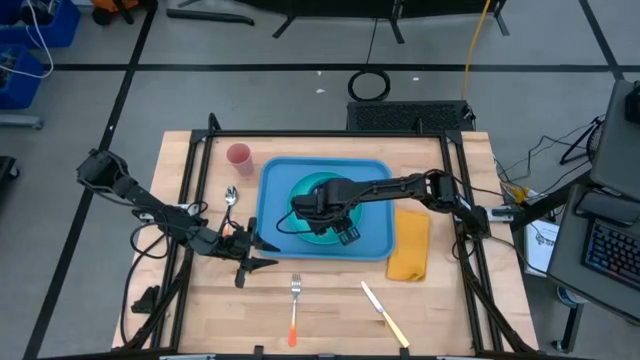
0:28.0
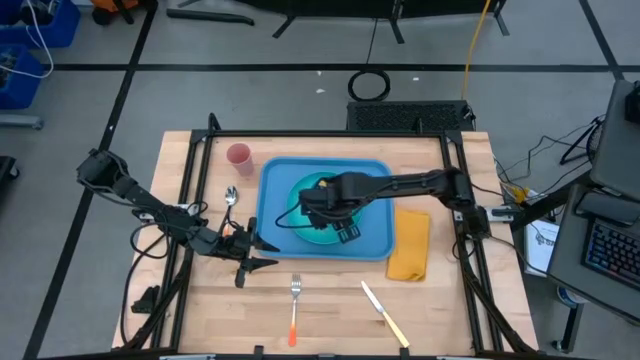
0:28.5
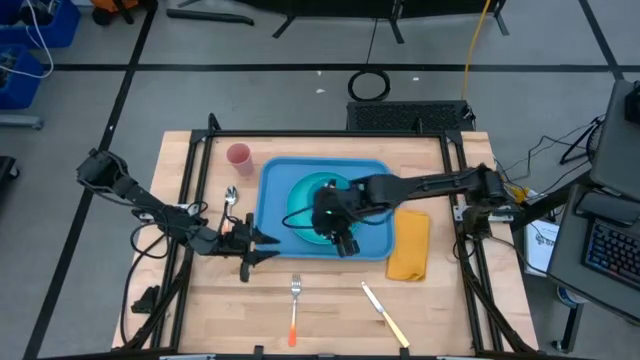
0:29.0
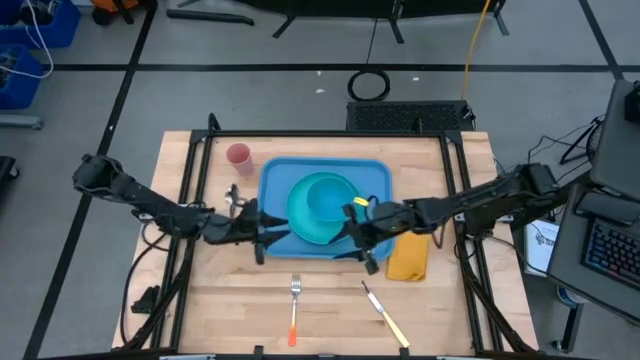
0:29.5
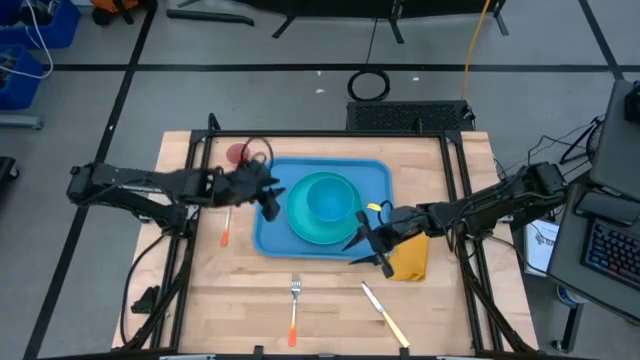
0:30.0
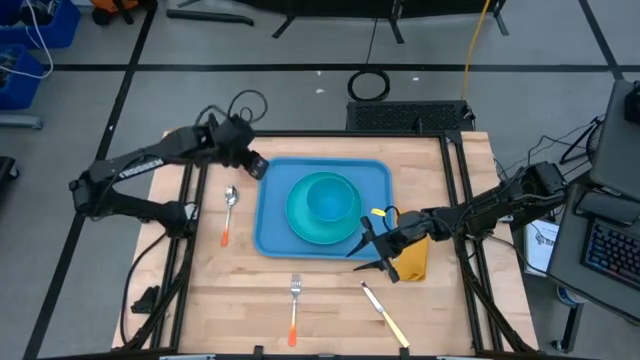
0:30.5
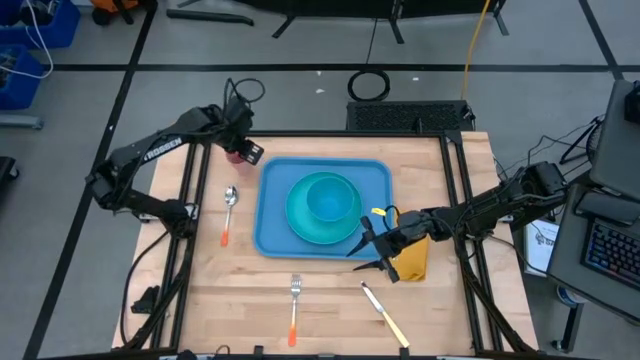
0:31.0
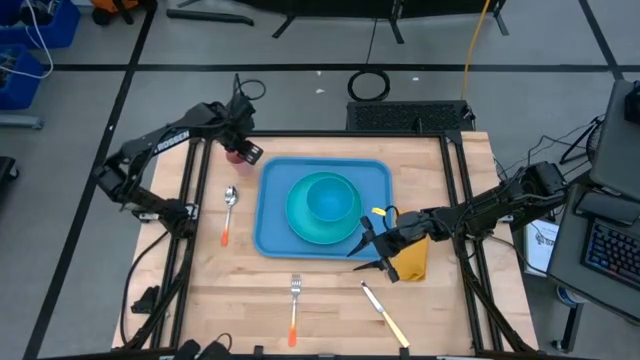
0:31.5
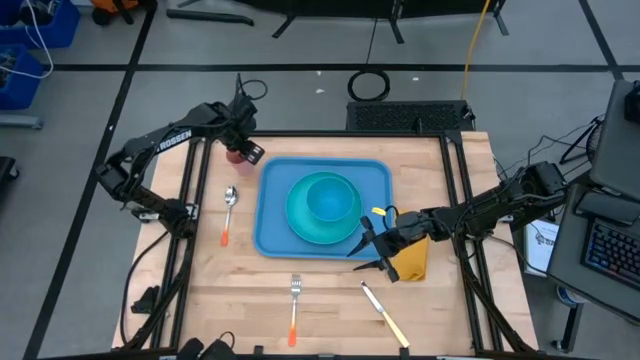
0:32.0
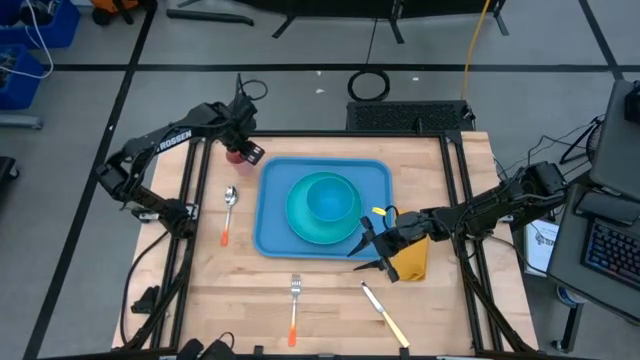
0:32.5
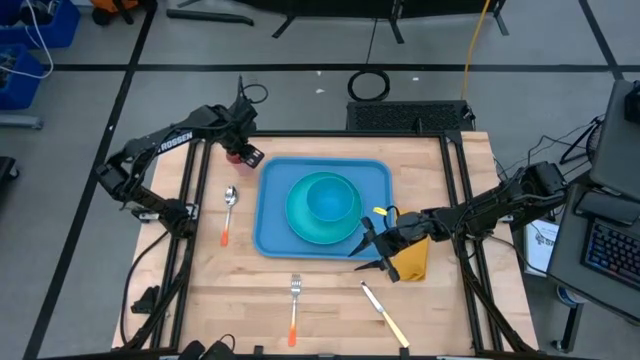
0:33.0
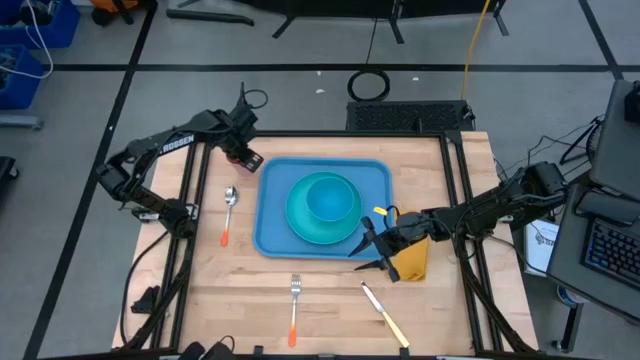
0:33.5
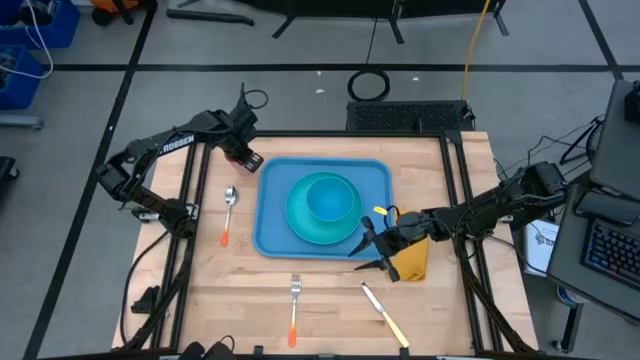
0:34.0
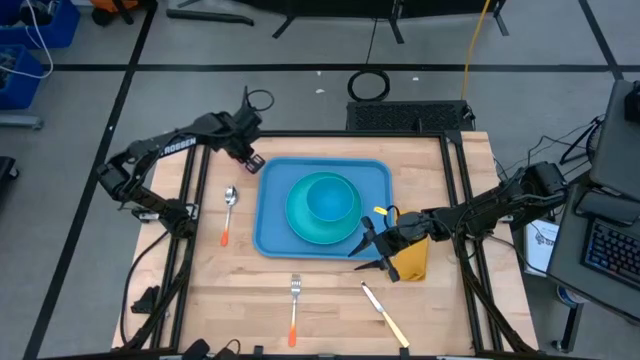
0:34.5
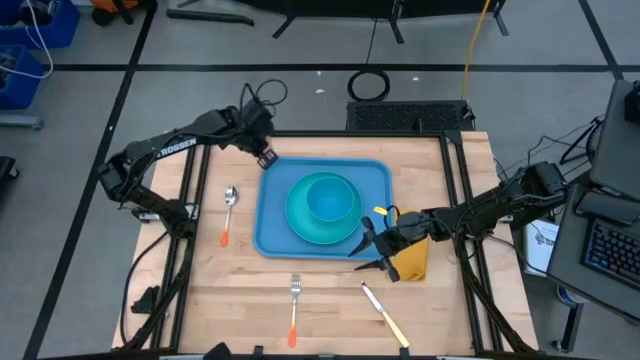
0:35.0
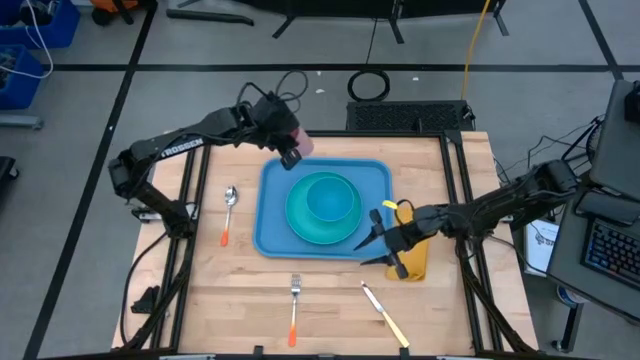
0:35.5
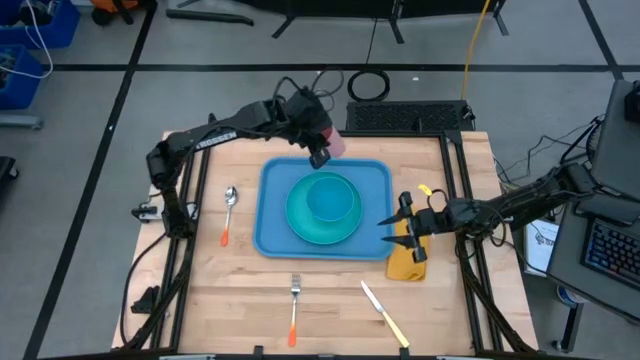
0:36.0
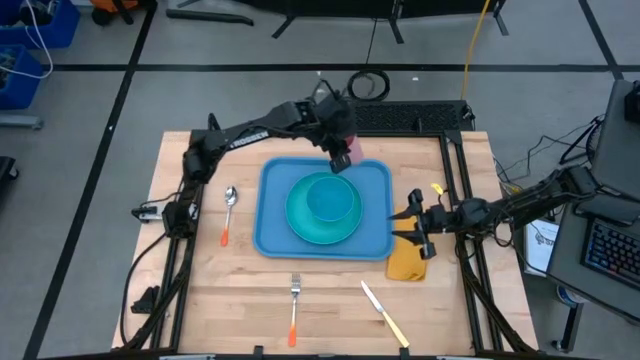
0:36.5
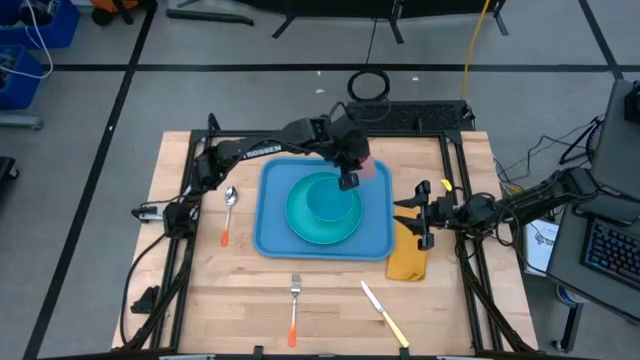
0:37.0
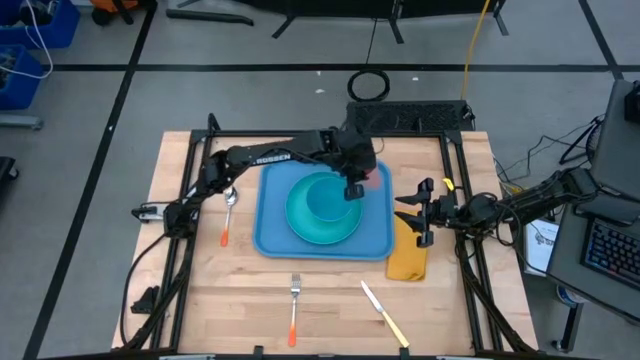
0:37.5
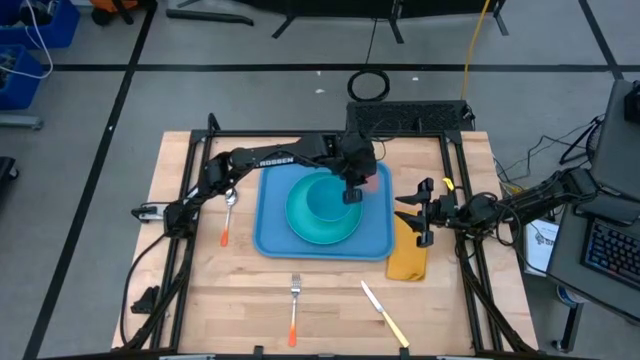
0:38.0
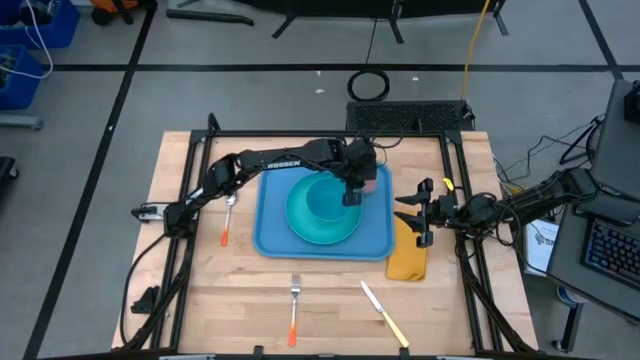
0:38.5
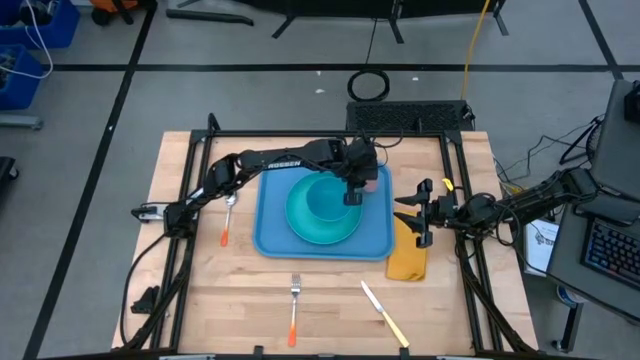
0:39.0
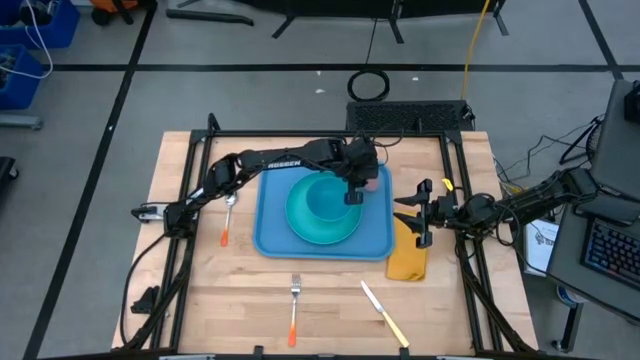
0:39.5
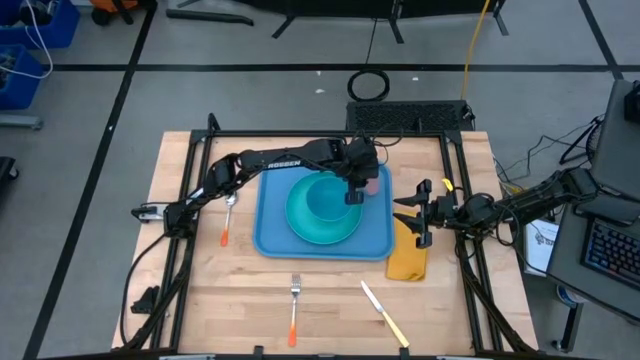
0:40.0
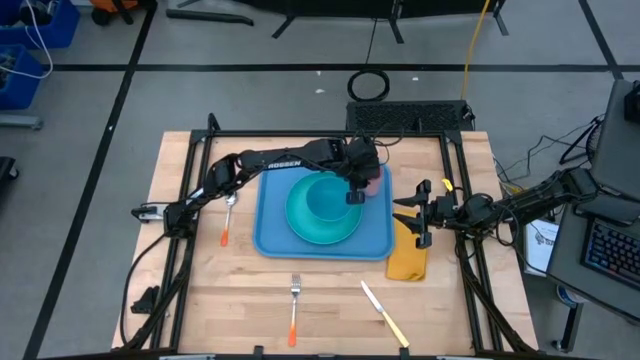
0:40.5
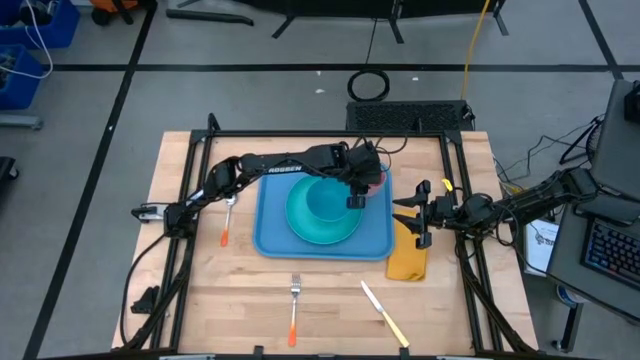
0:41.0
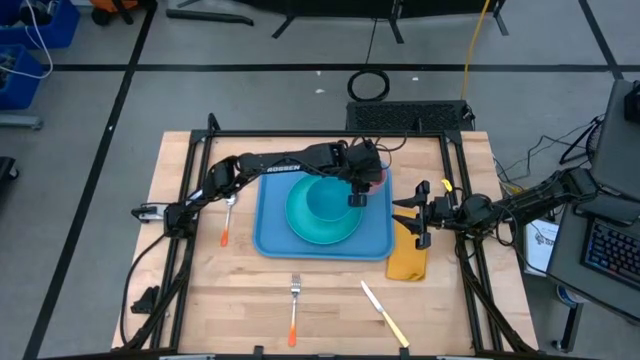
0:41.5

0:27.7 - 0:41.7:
Task: Set up tray
Put the pink cup on the top of the green plate on the blue serving tray

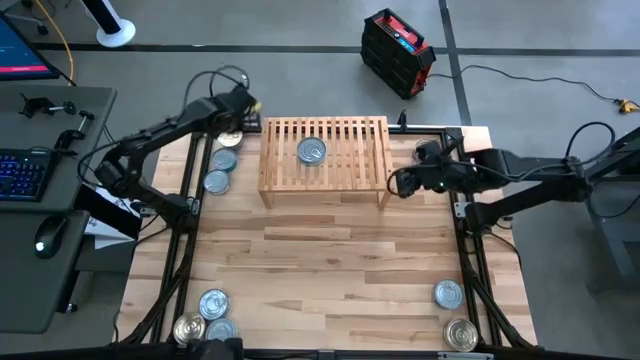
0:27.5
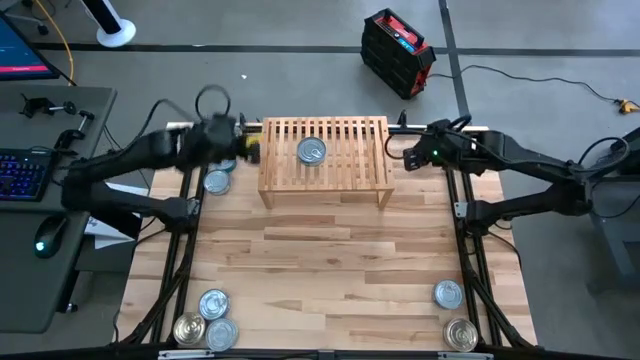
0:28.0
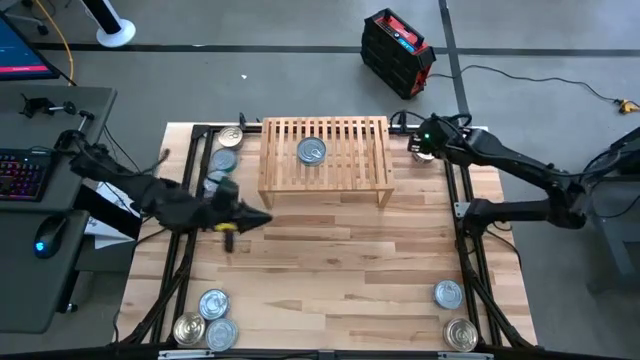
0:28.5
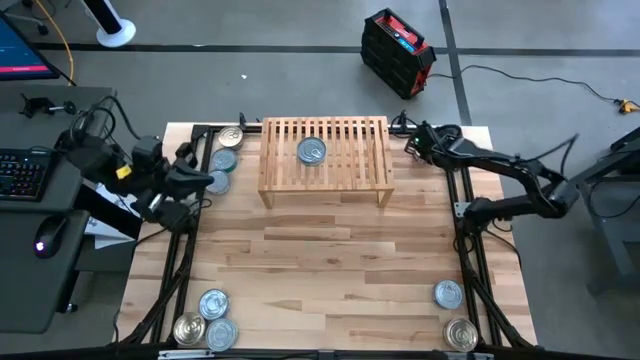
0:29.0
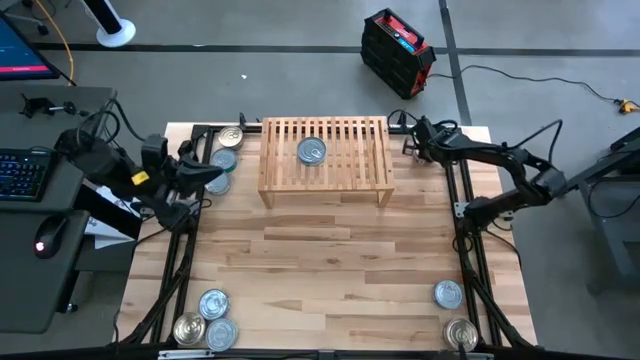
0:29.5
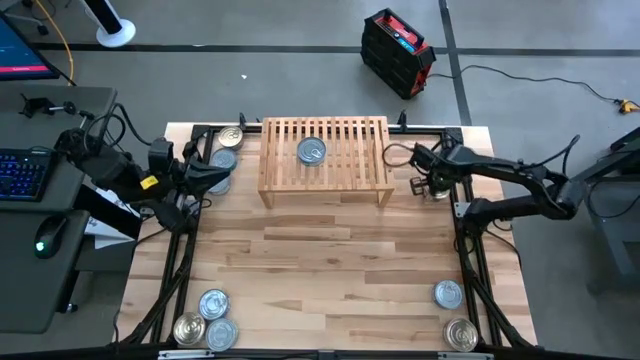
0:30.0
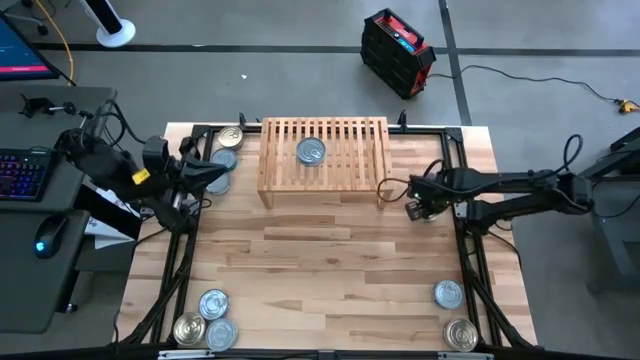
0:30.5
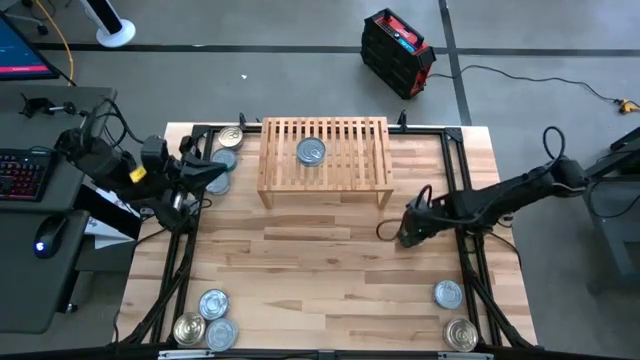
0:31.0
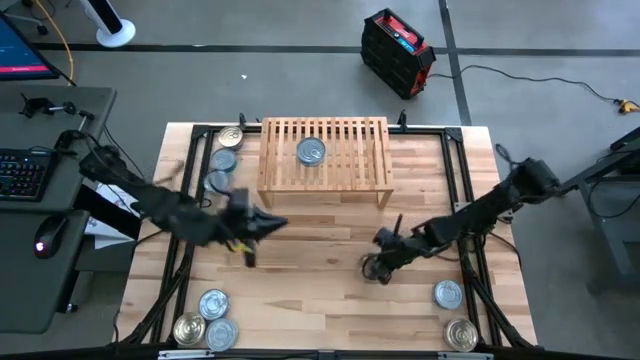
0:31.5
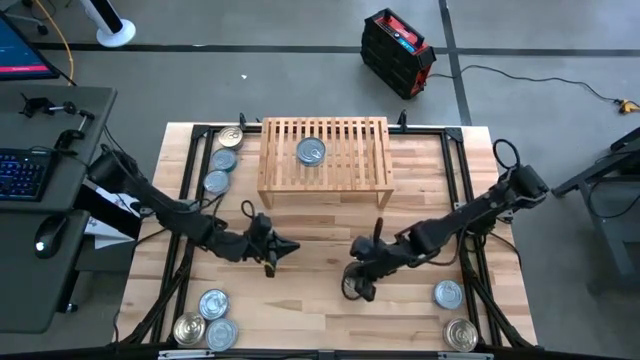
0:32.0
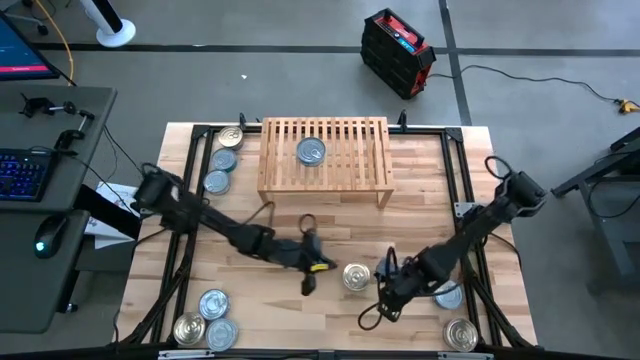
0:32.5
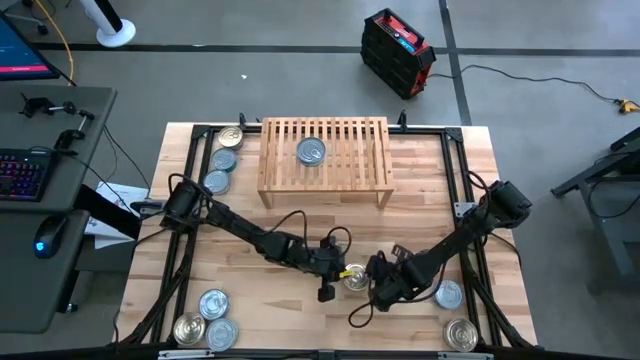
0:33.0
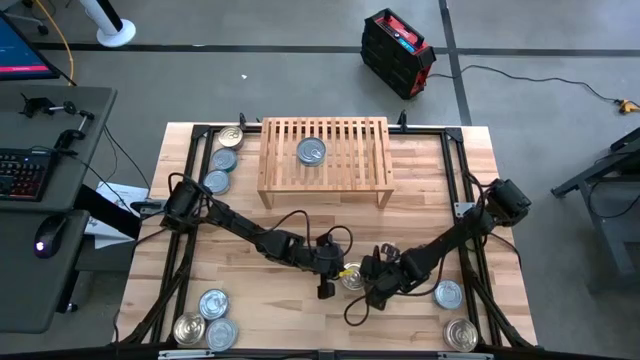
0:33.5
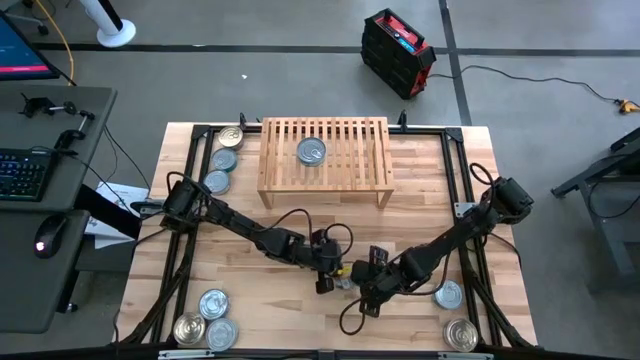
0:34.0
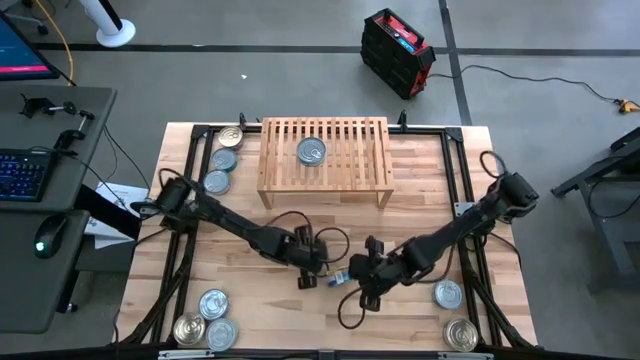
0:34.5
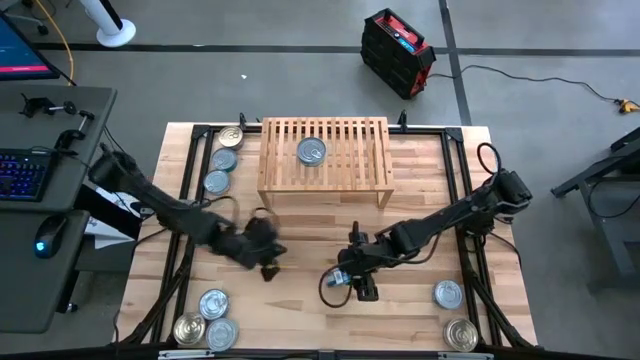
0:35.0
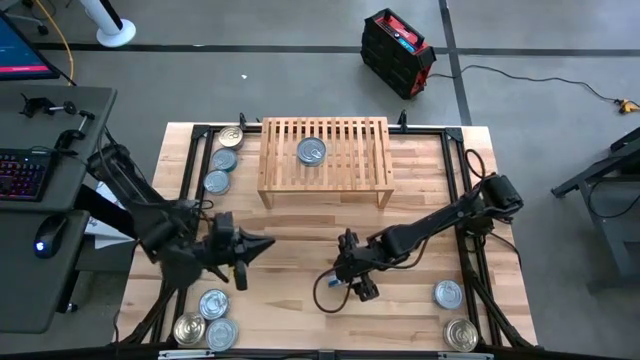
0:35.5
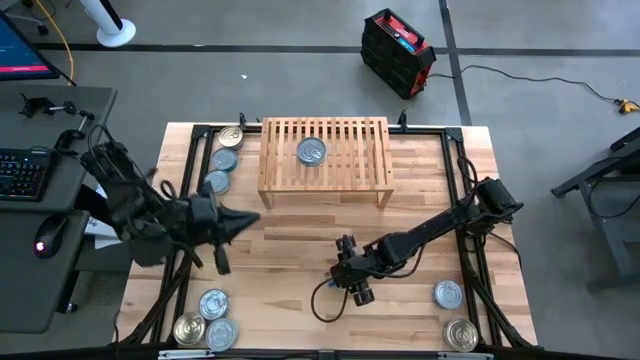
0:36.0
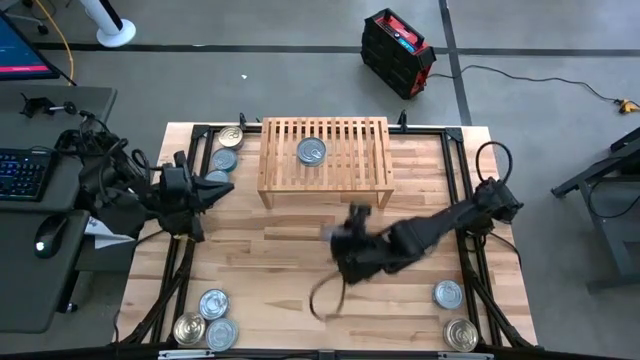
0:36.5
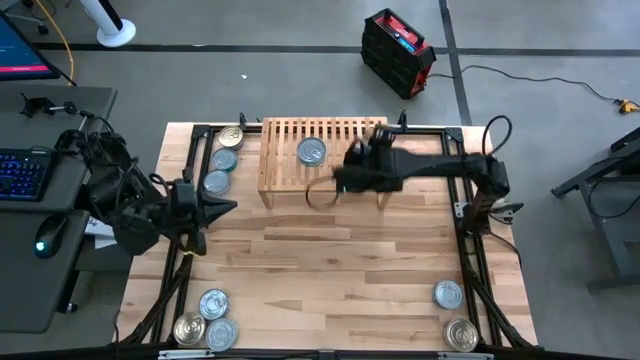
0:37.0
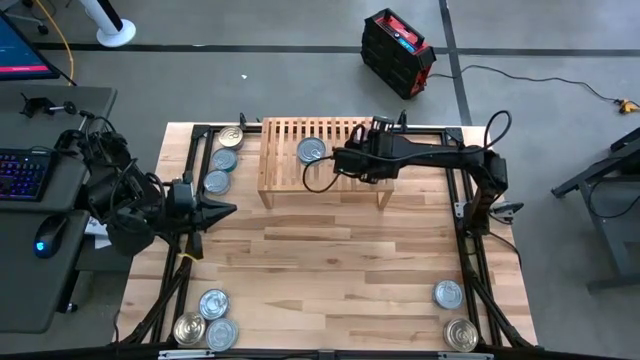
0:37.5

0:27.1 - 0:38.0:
Task: Stack canned seafood by type on shelf
Put the pink tuna can on the shelf
